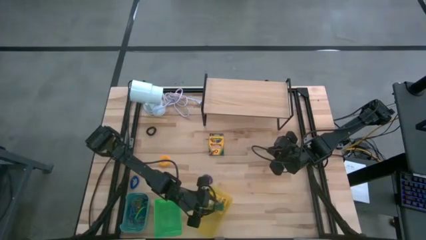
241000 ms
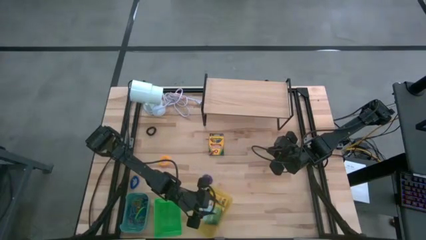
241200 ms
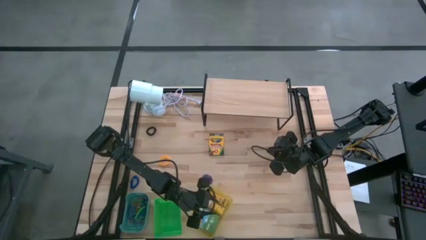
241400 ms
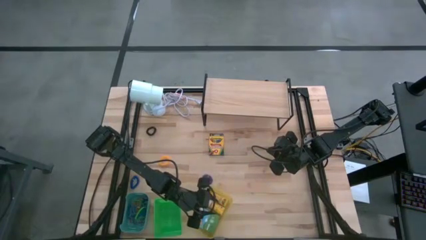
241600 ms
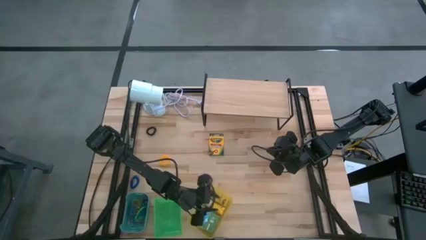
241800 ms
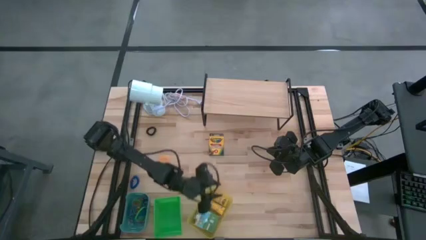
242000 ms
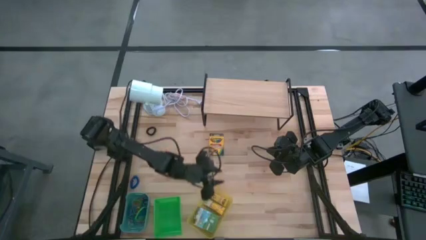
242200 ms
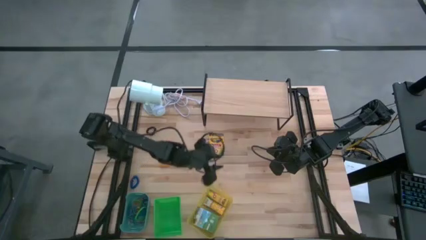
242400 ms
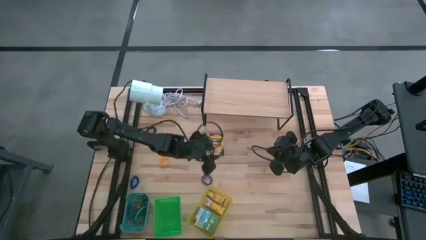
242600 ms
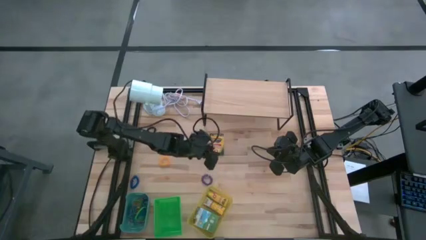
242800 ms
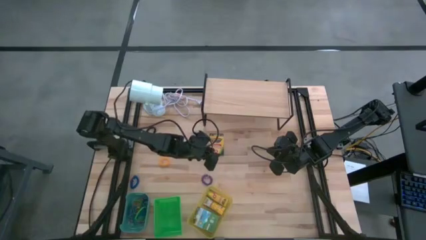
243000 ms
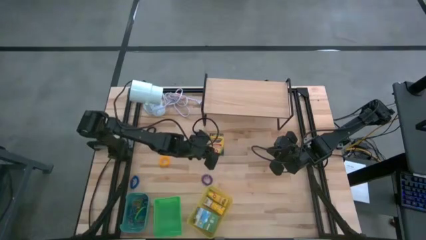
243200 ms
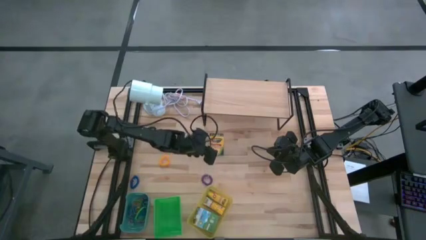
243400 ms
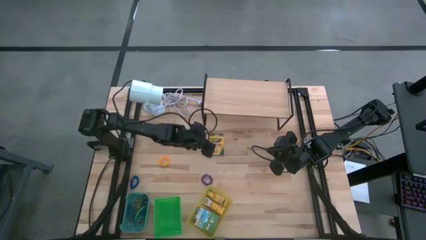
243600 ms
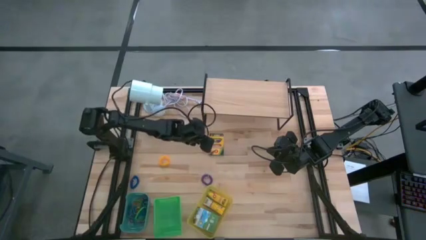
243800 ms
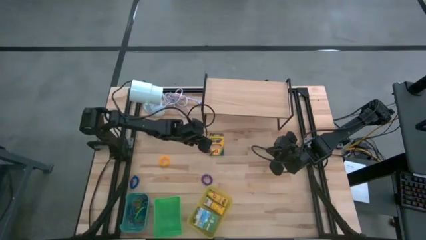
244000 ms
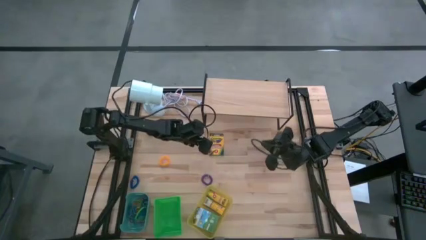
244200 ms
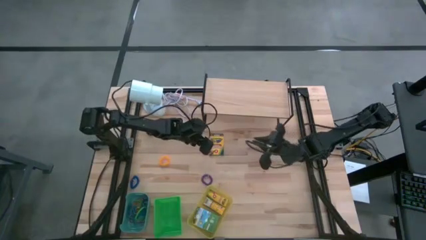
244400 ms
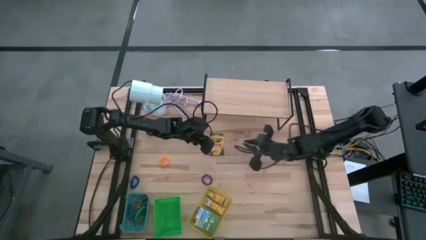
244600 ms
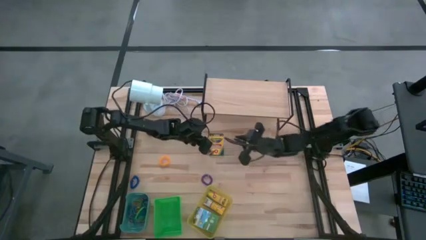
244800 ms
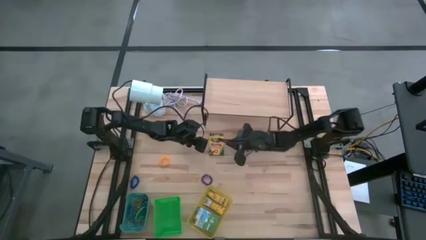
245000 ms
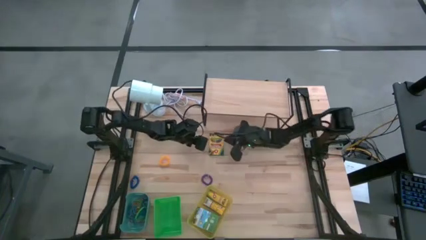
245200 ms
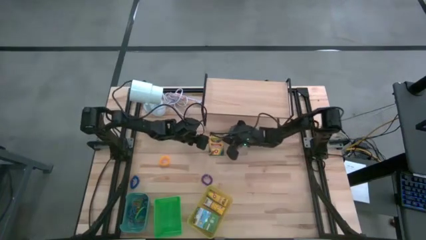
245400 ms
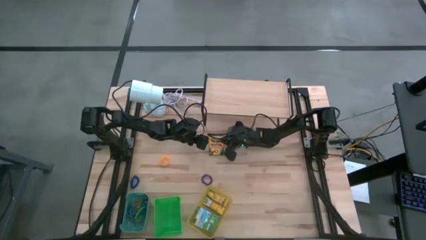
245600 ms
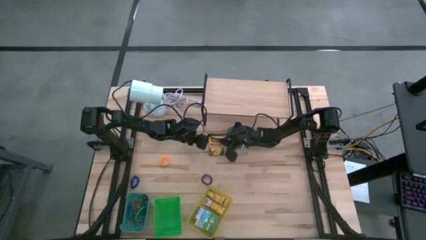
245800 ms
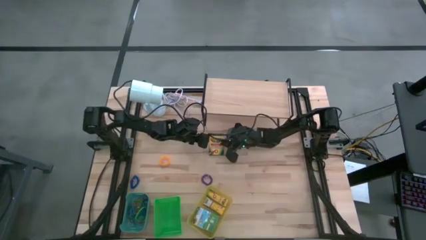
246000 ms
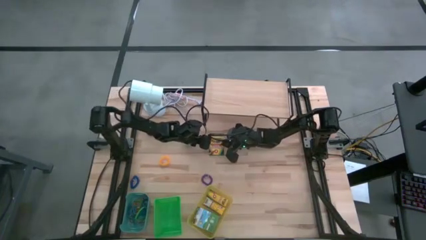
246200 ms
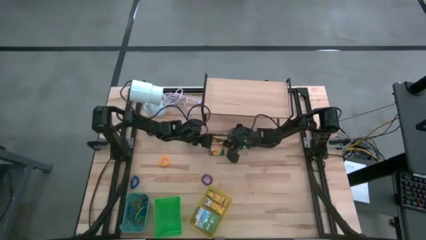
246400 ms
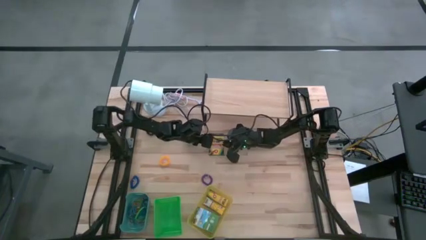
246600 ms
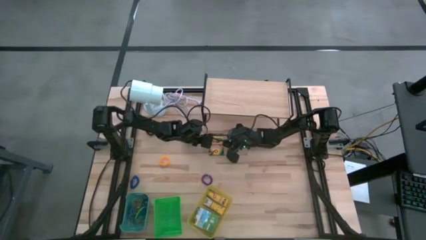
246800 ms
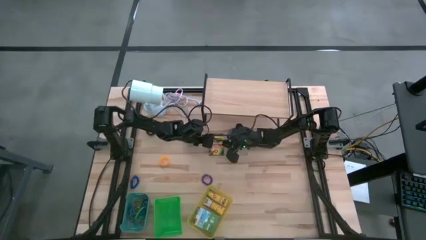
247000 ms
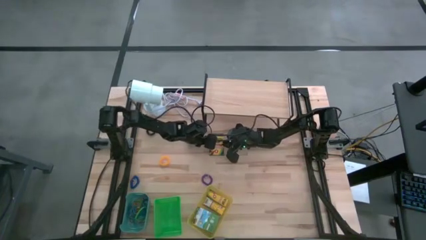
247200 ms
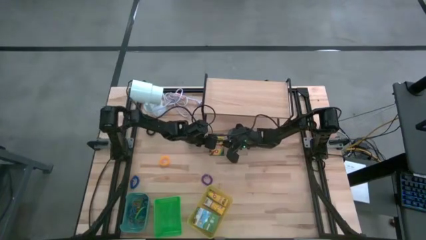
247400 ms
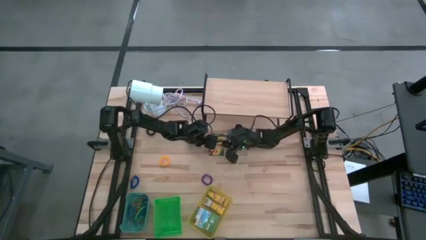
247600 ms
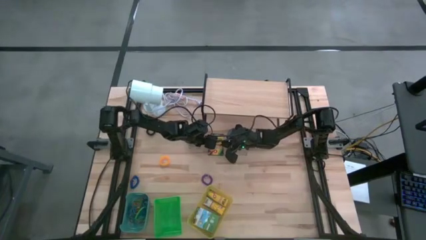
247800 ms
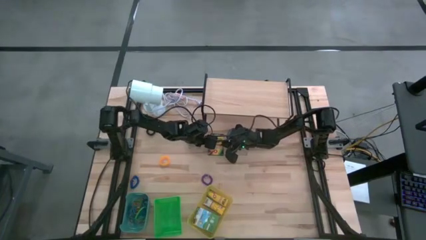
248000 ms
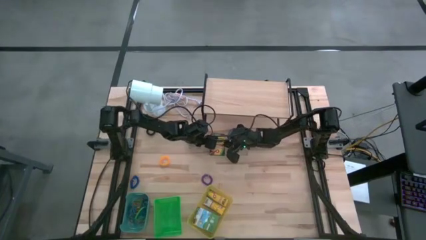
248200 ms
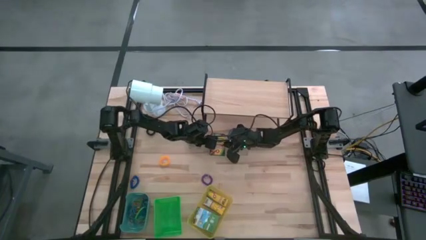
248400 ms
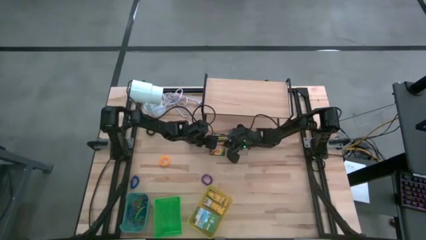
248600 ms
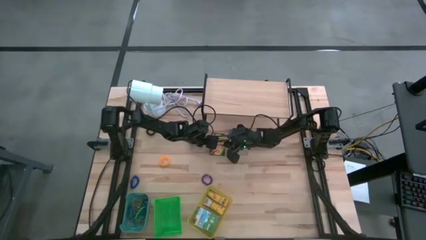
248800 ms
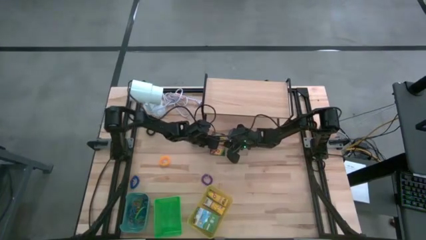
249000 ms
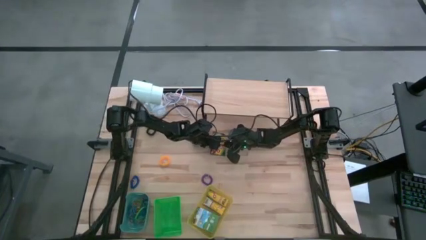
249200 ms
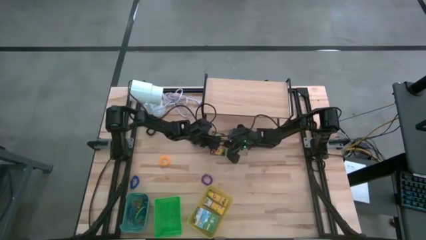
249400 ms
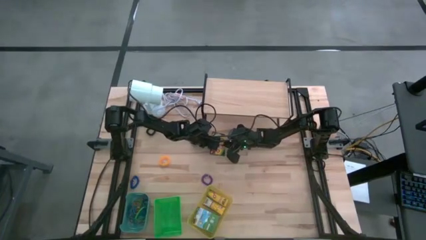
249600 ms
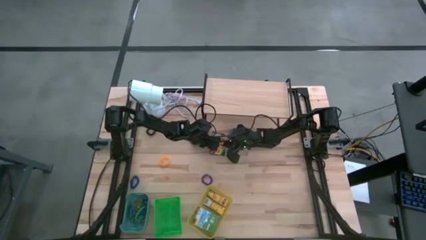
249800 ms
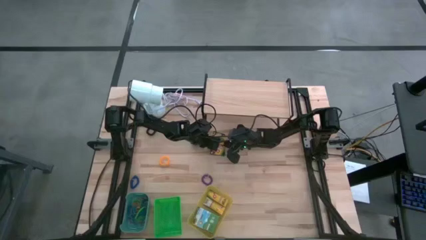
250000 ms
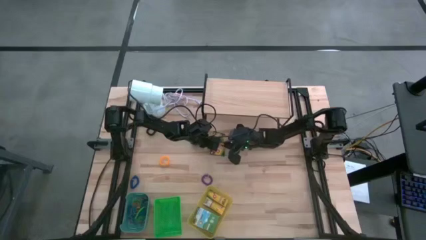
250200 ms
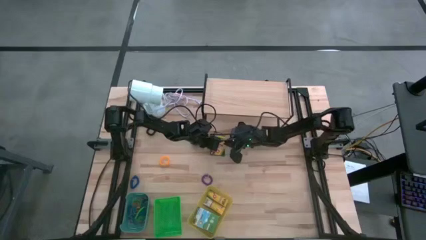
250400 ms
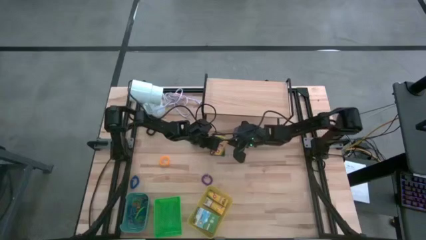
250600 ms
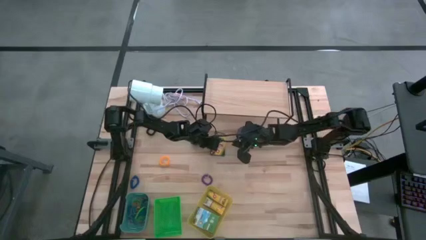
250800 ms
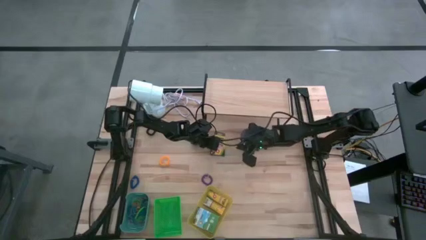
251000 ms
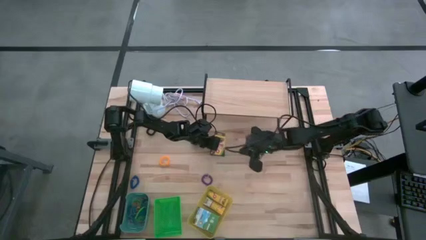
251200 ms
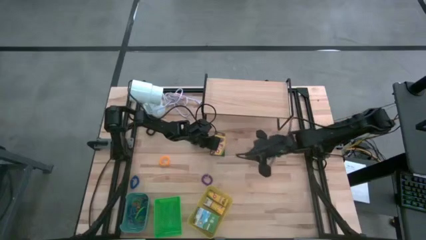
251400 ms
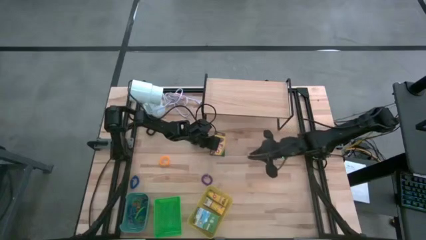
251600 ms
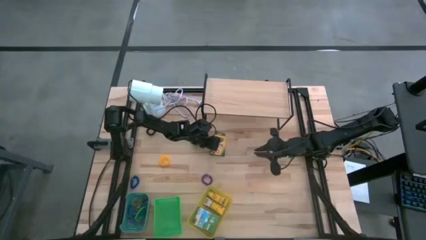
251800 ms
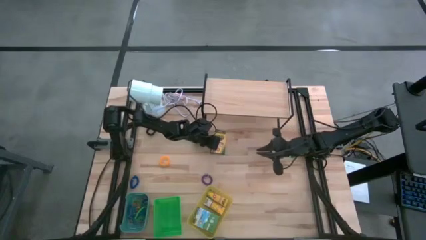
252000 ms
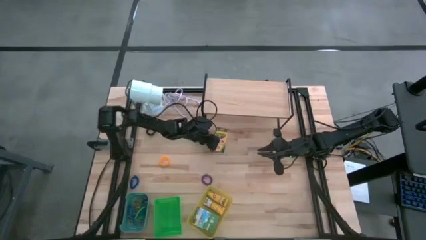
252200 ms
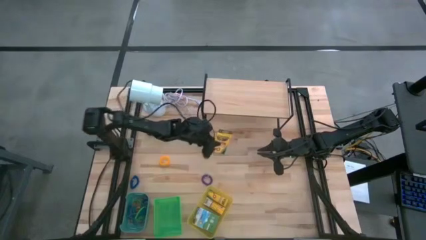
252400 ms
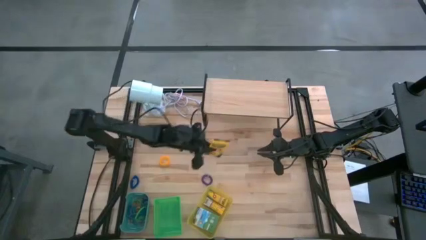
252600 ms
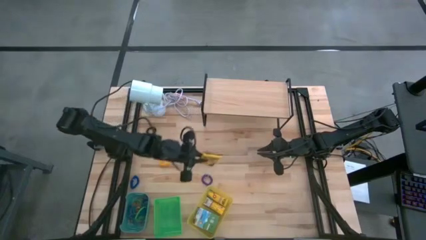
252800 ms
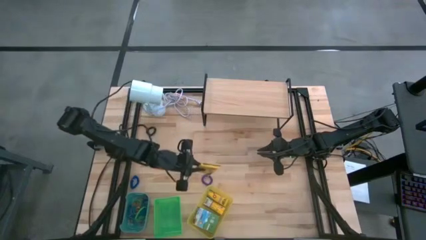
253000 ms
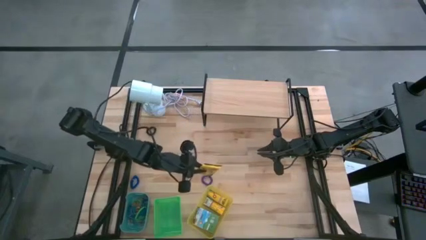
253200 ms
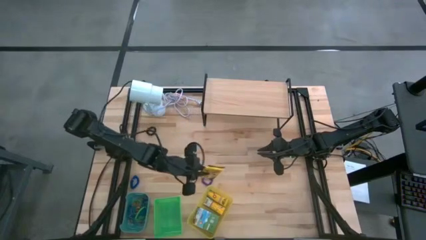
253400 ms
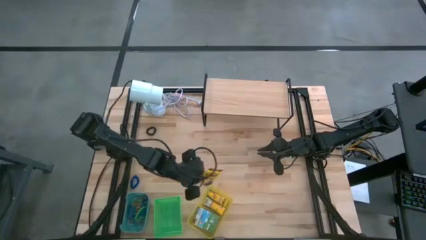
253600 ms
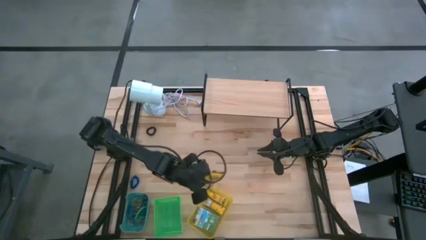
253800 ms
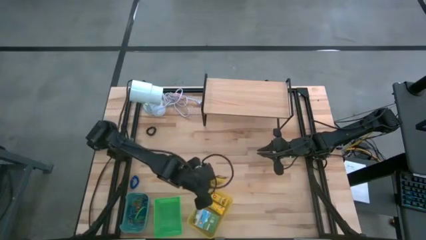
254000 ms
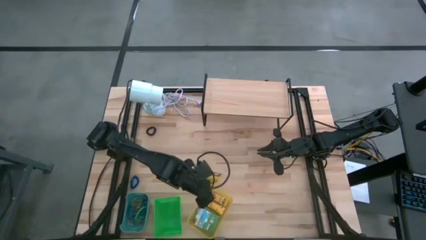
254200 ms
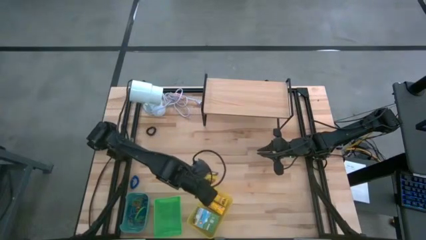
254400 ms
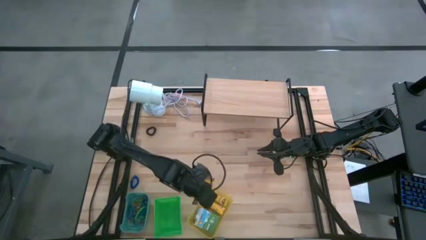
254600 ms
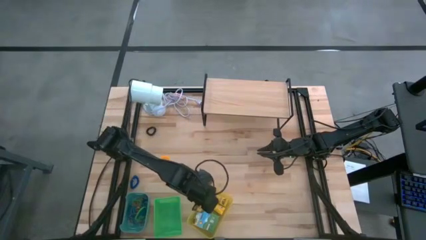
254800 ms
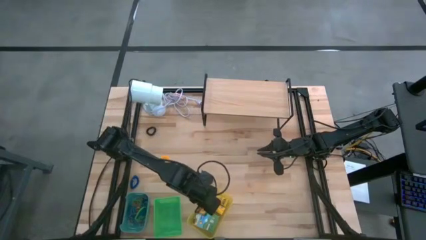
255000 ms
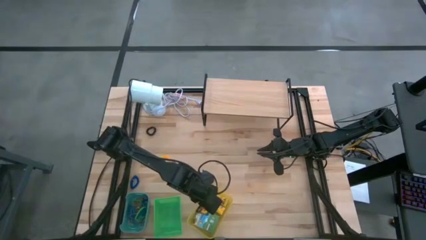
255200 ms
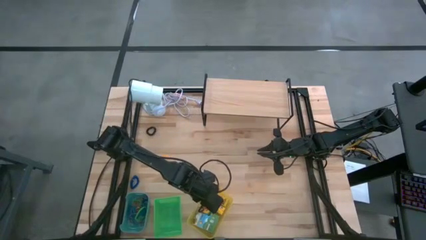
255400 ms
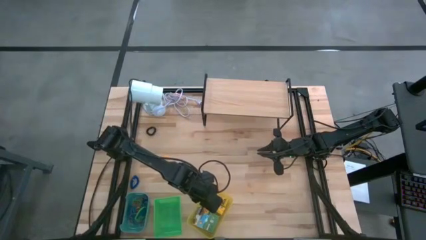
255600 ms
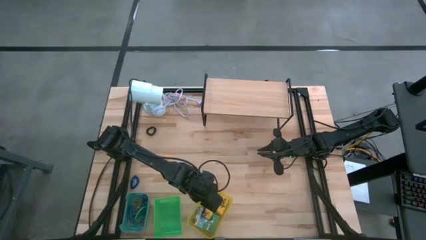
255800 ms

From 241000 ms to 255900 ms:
Task: Pick & Place Office Desk Supplies
Put the crayon box into the yellow bin
